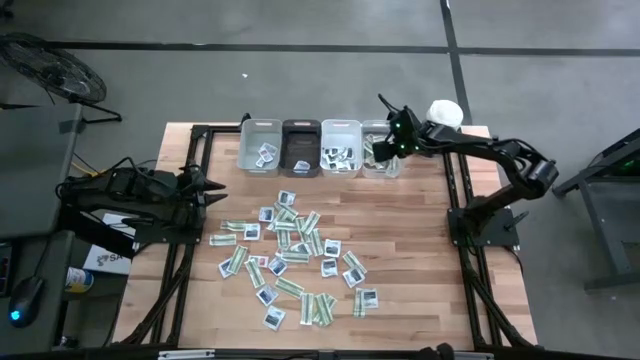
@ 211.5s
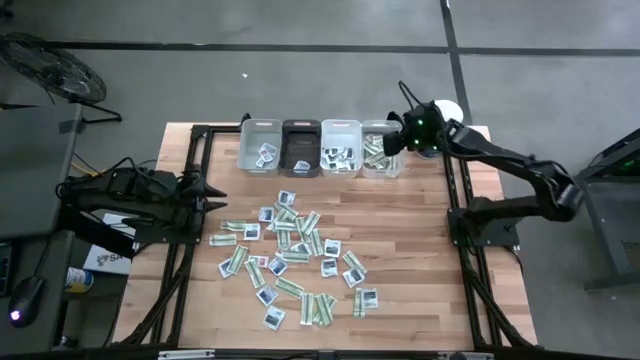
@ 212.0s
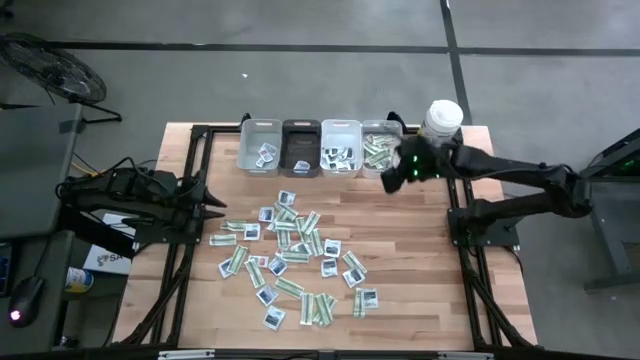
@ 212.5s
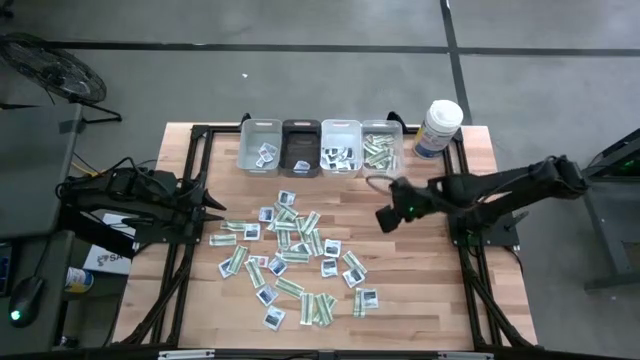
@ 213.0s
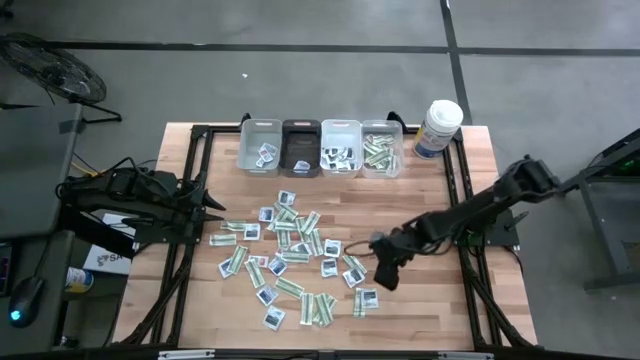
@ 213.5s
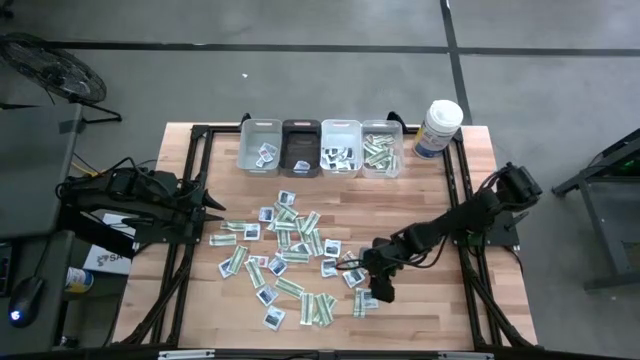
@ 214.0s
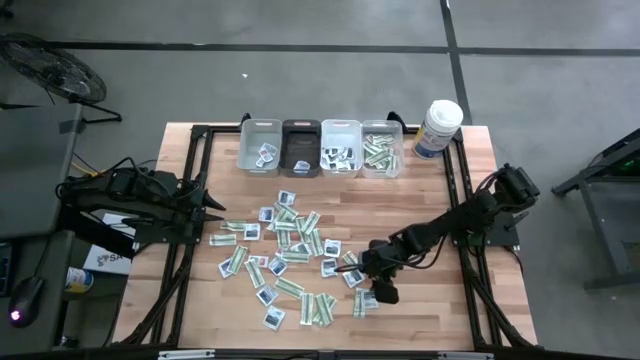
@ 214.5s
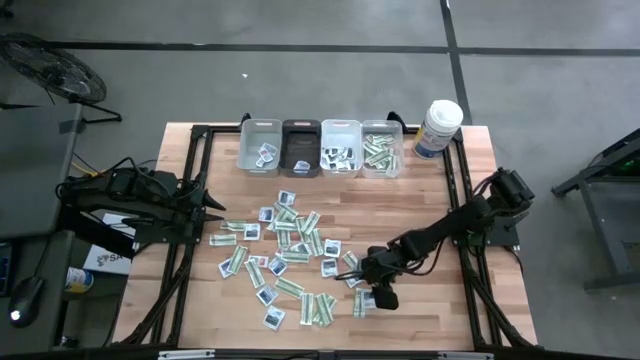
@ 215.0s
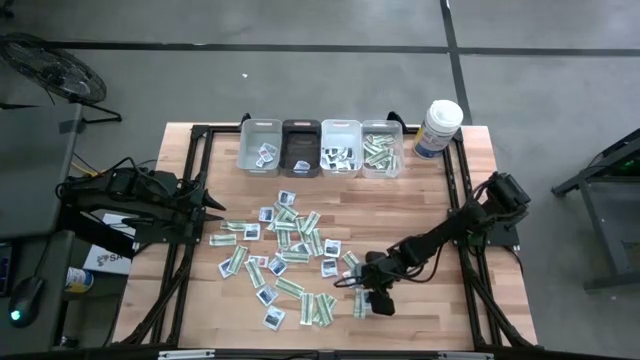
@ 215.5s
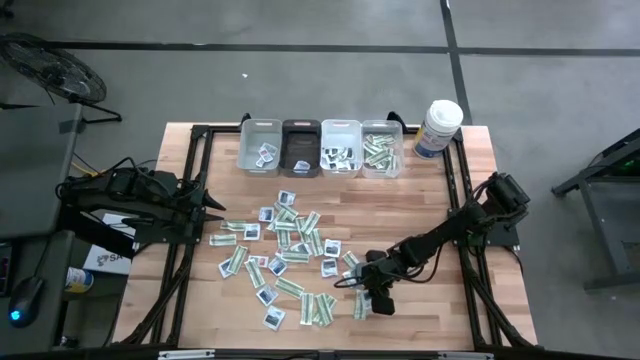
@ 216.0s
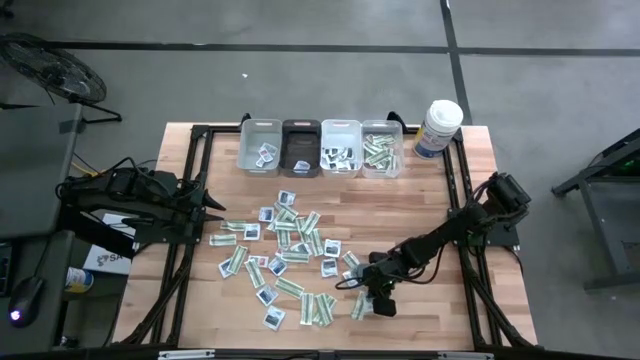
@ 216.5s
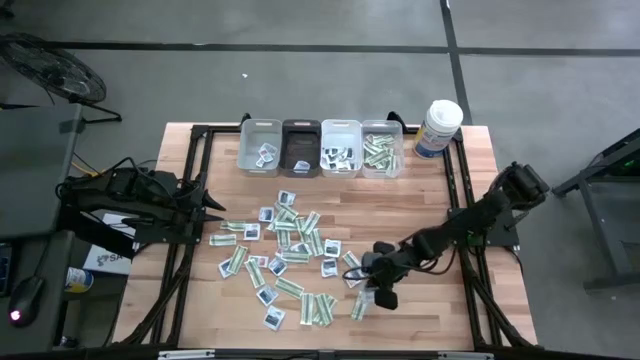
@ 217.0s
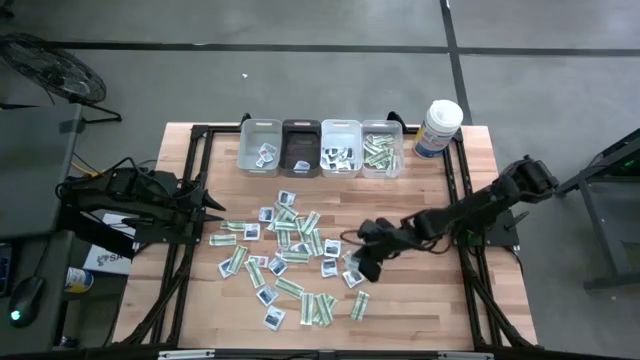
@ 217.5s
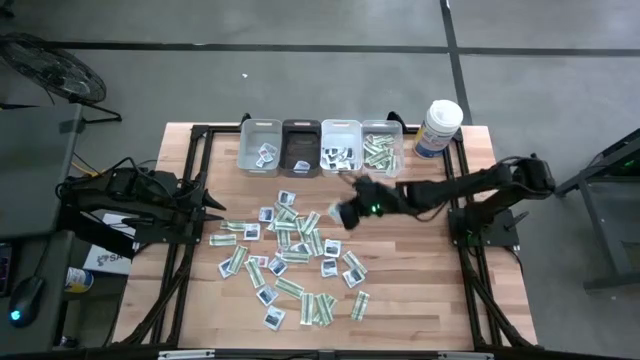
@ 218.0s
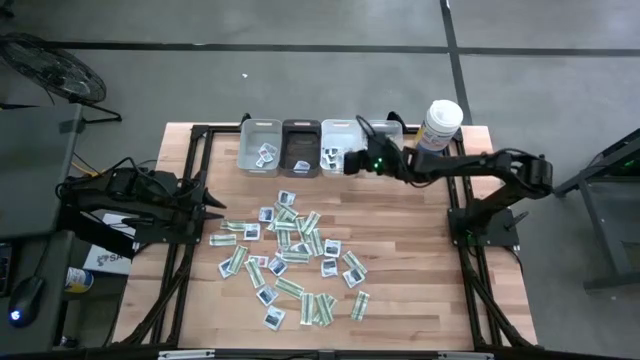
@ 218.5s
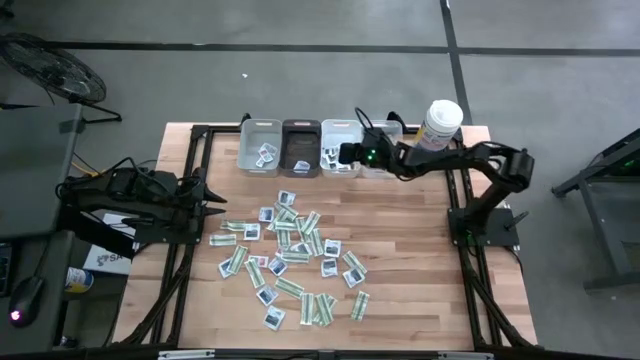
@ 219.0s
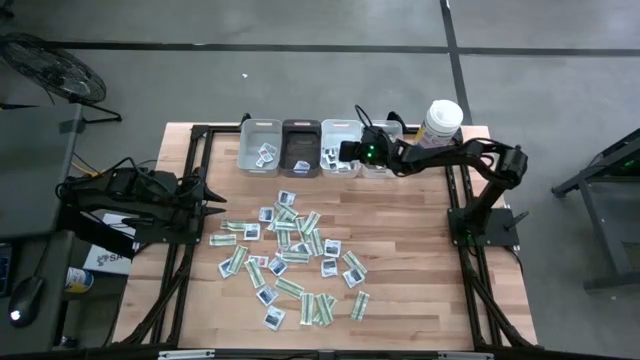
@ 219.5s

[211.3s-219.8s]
Task: Pick & Place First Aid Supplies
Put the black towelette pack into the white bin

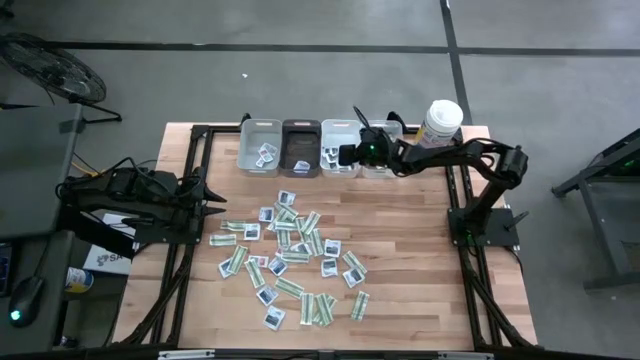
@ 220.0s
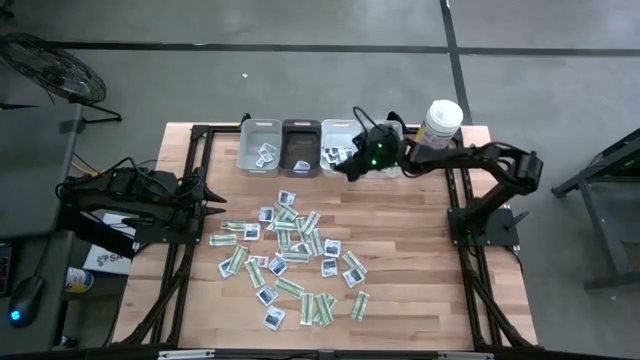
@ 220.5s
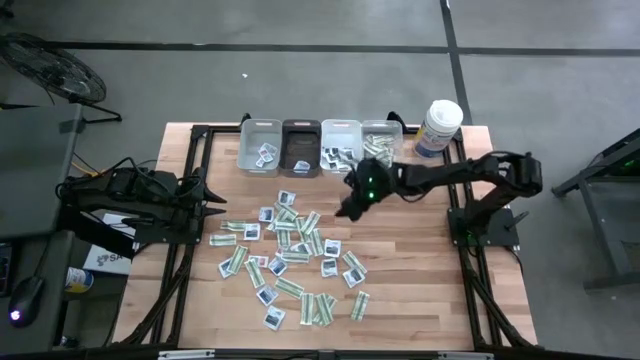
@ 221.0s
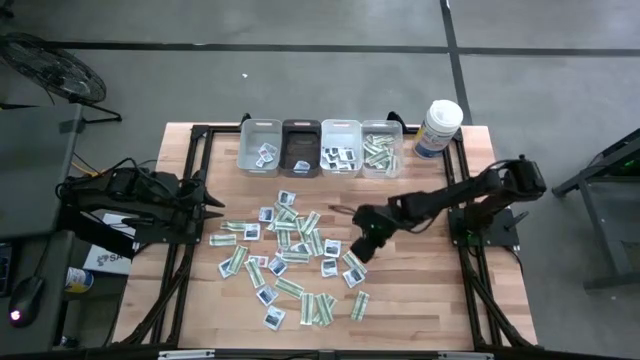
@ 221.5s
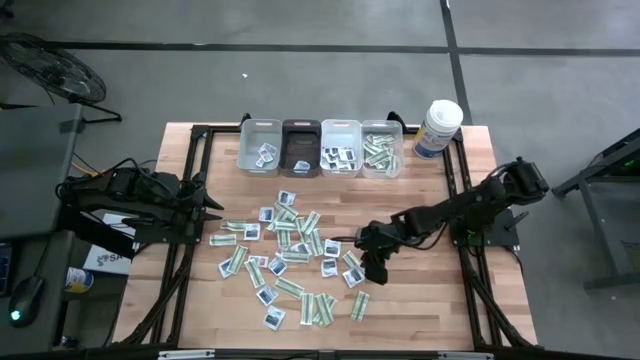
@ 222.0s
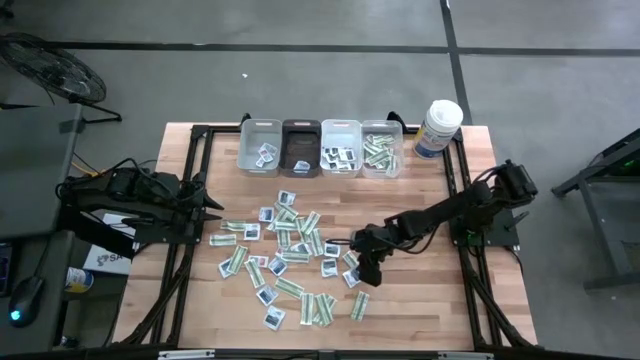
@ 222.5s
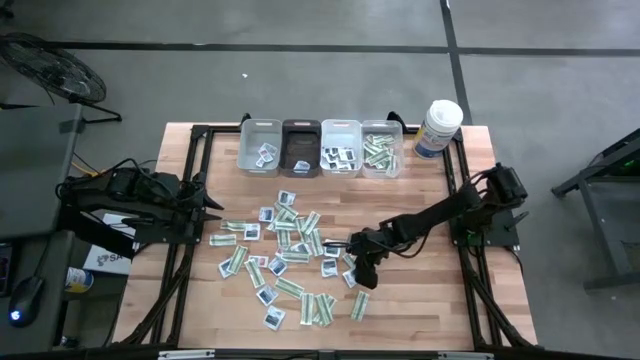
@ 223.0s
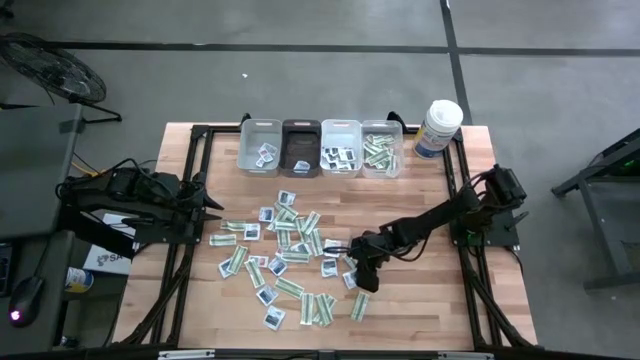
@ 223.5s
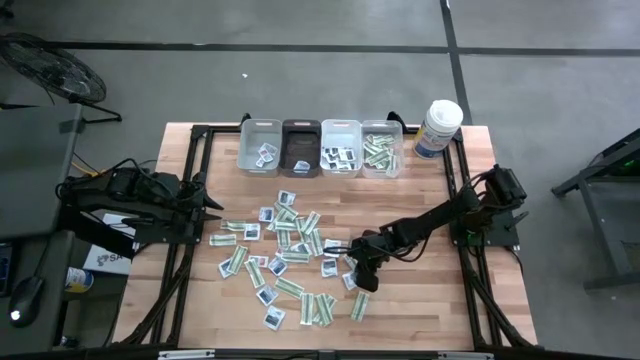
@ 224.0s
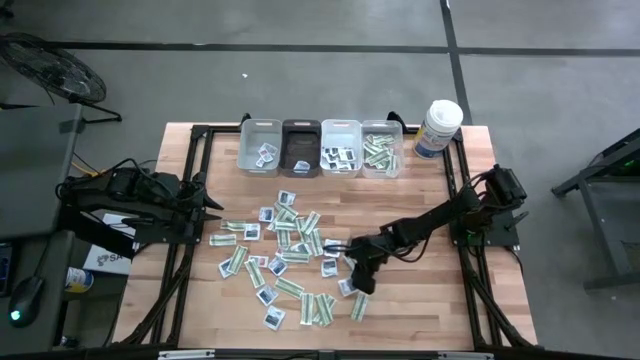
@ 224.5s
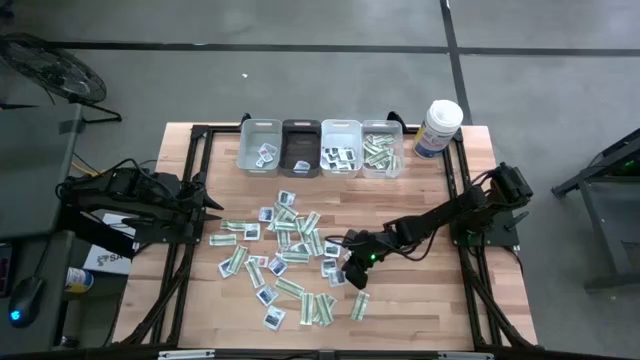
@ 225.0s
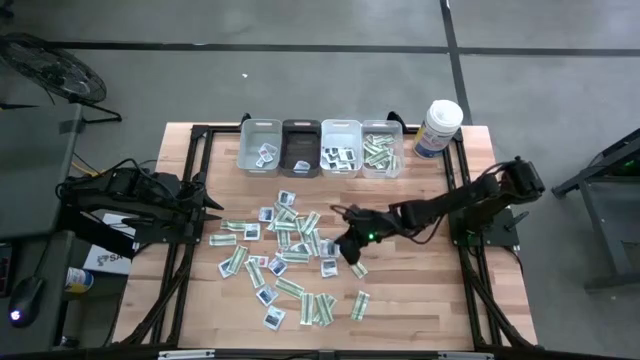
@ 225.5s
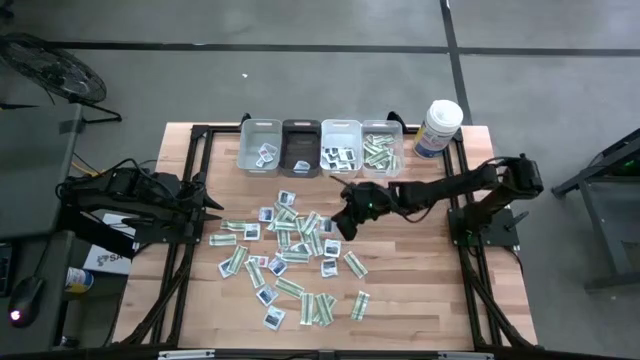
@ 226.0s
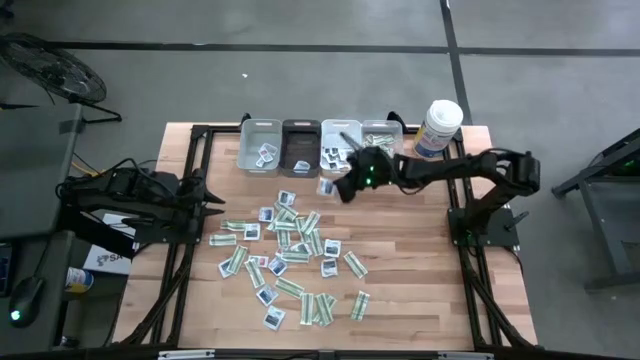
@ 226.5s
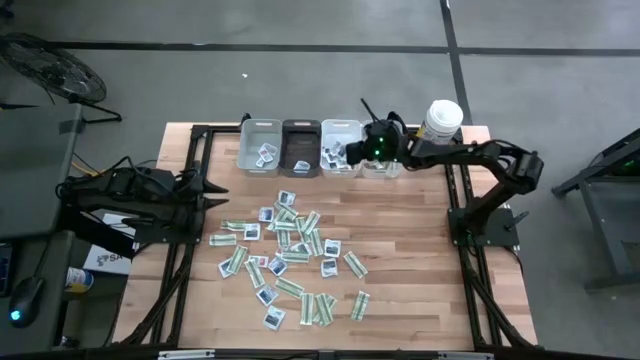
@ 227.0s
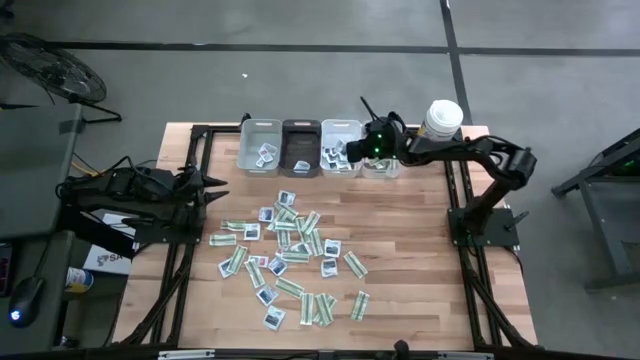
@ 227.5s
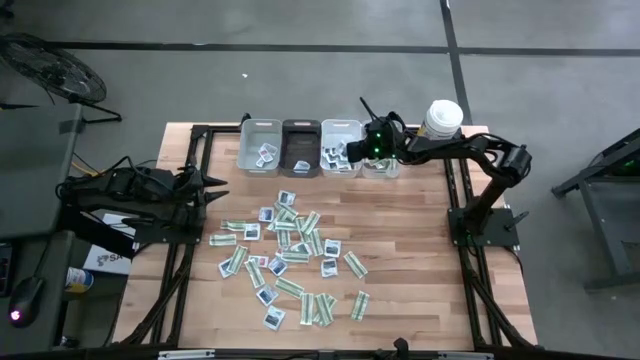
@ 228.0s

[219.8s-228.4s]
Put the black towelette pack into the white bin

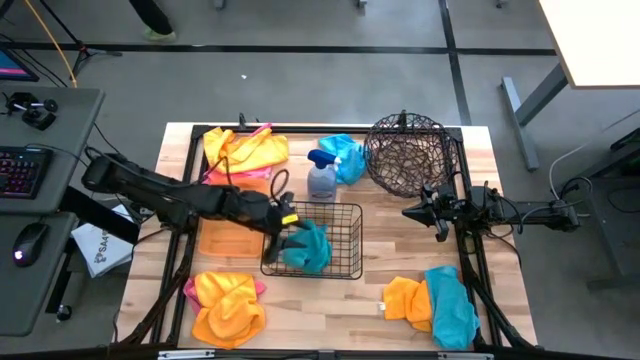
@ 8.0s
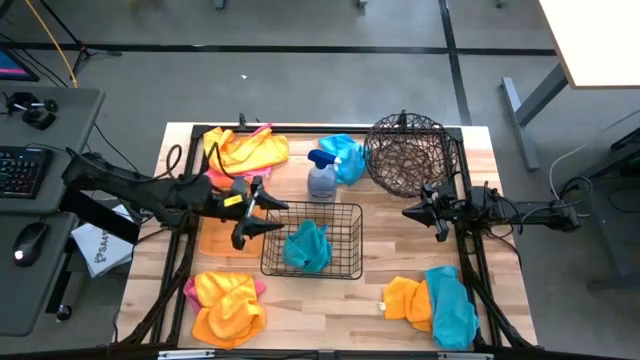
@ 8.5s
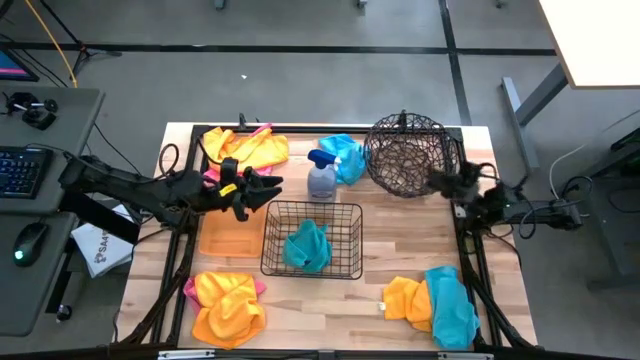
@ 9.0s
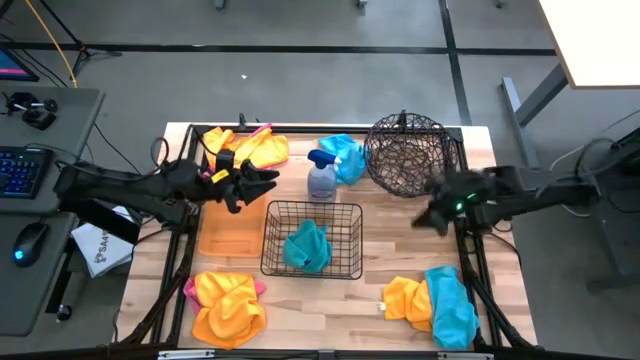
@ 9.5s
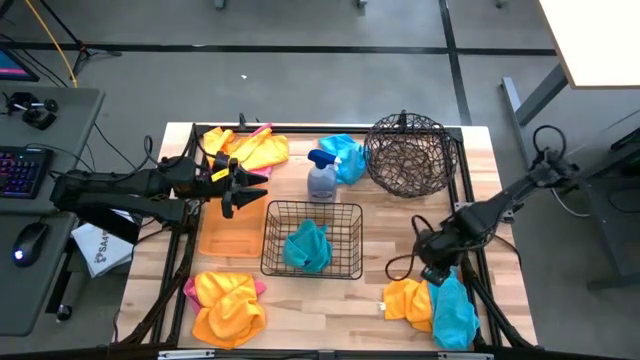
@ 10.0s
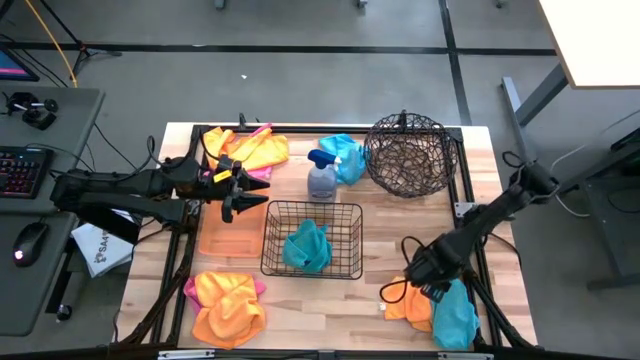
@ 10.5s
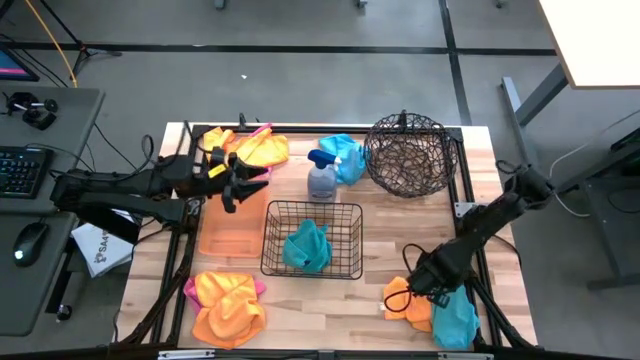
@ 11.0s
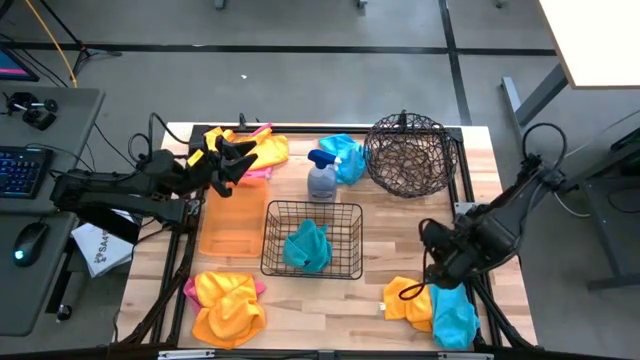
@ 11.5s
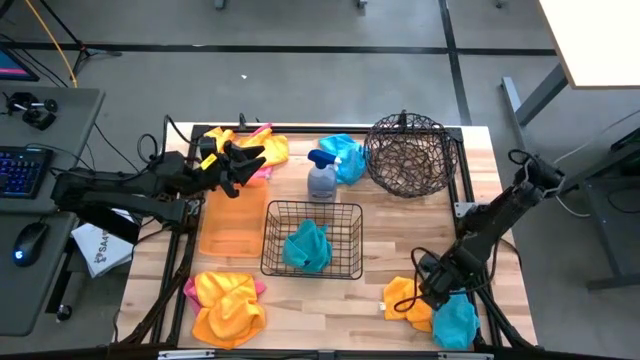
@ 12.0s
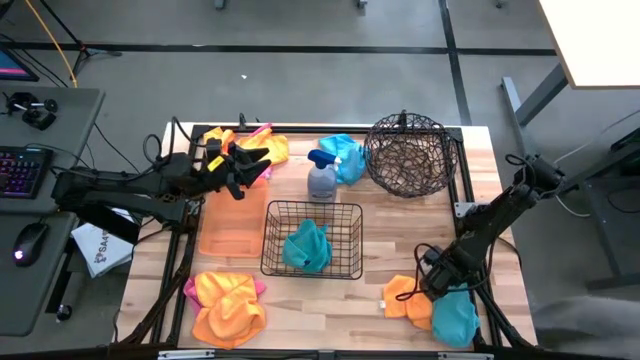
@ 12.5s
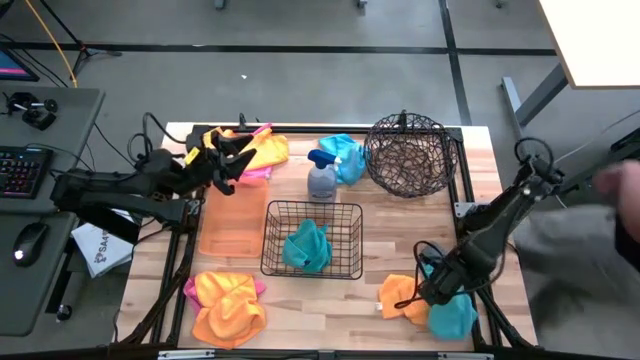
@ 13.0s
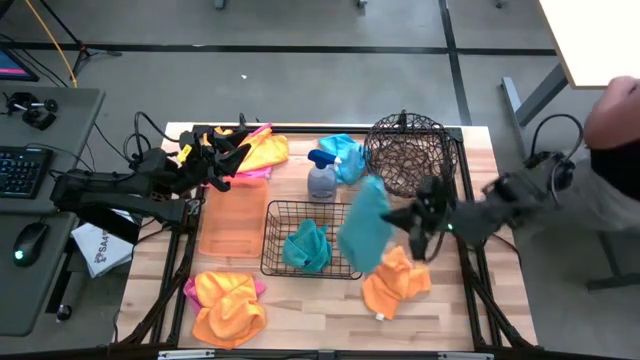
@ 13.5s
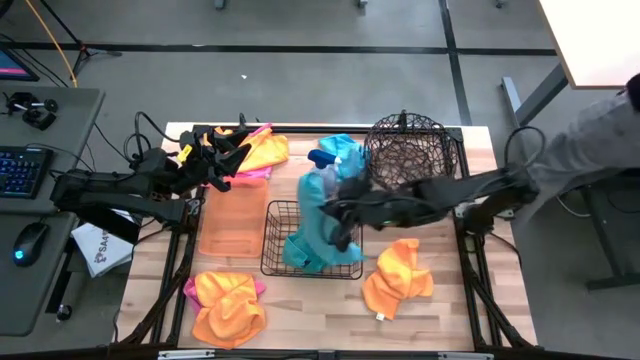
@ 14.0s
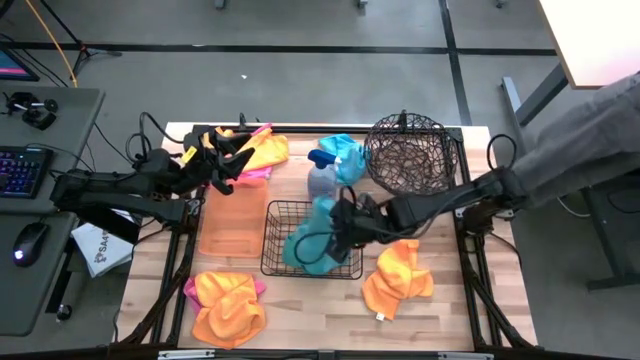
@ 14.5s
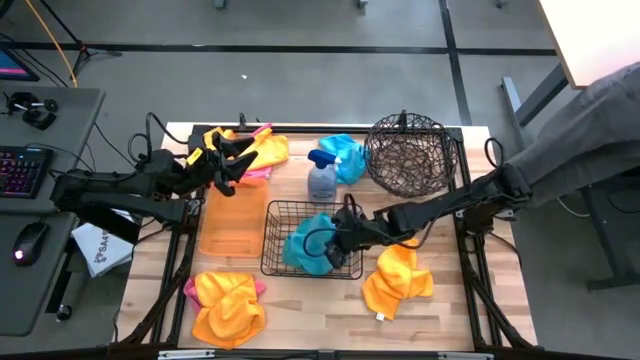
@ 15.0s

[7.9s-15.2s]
Task: Sort microfiber towel by color & place in baskets
Put the bottom right blue towel into the bottom wire basket
